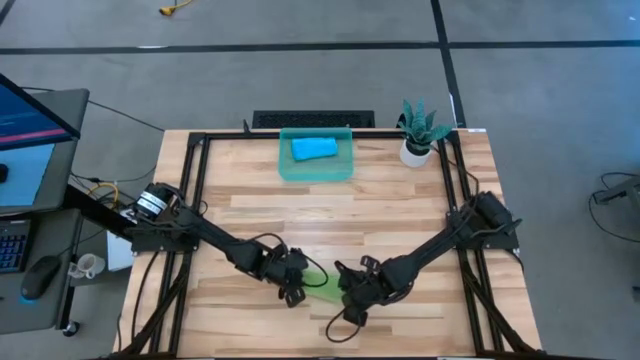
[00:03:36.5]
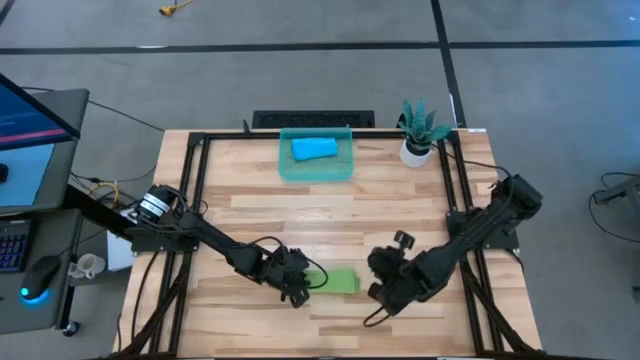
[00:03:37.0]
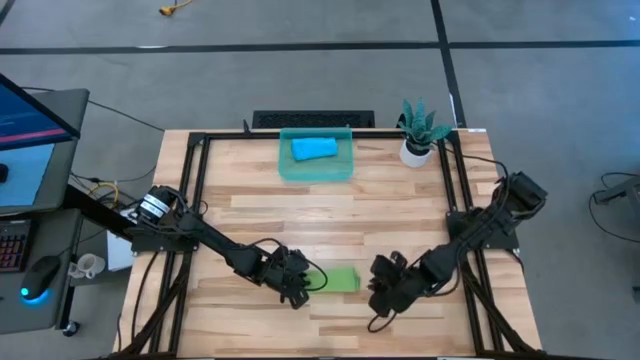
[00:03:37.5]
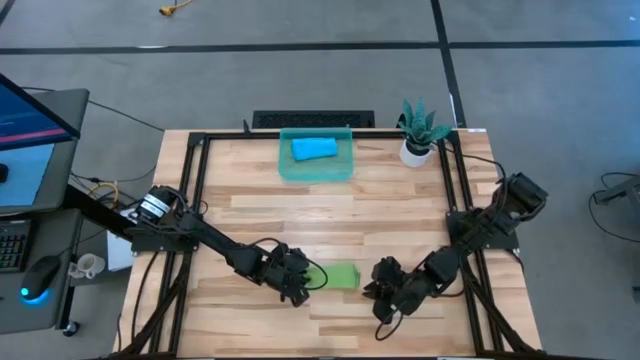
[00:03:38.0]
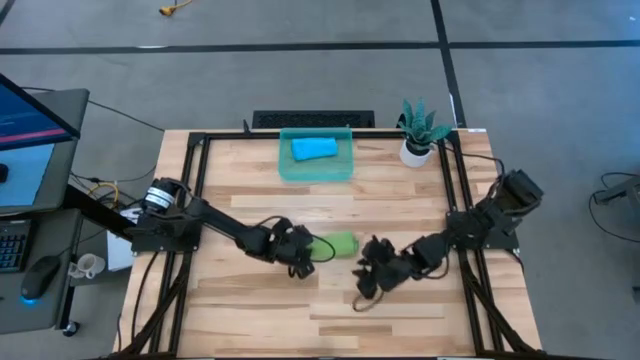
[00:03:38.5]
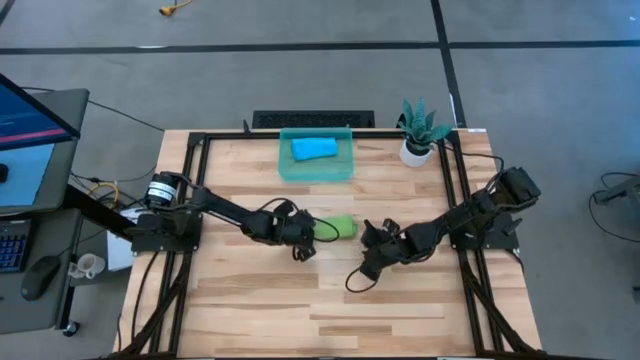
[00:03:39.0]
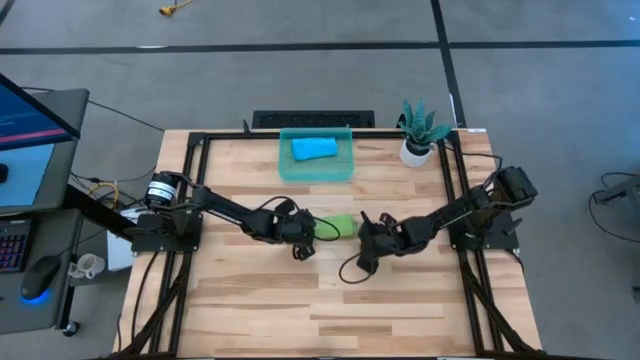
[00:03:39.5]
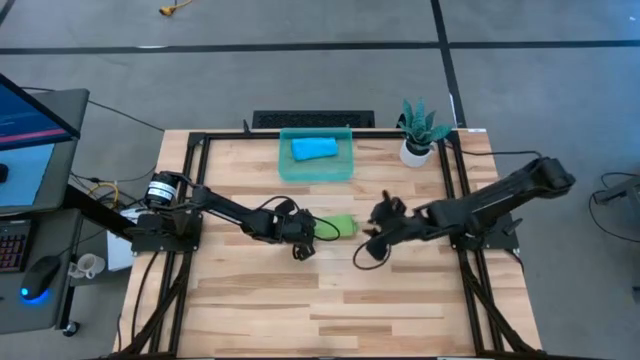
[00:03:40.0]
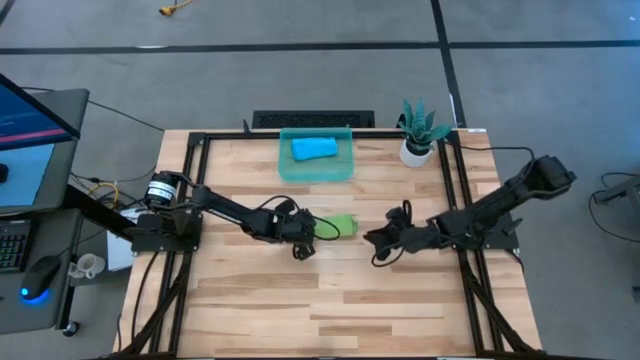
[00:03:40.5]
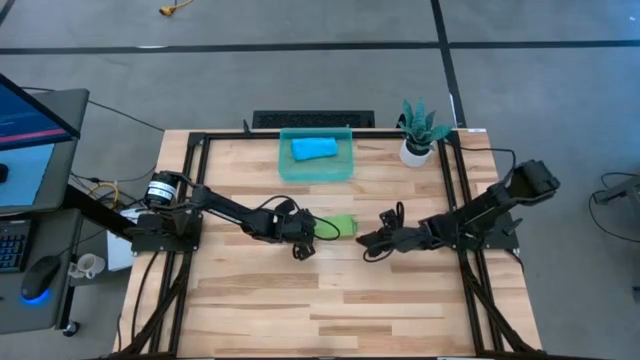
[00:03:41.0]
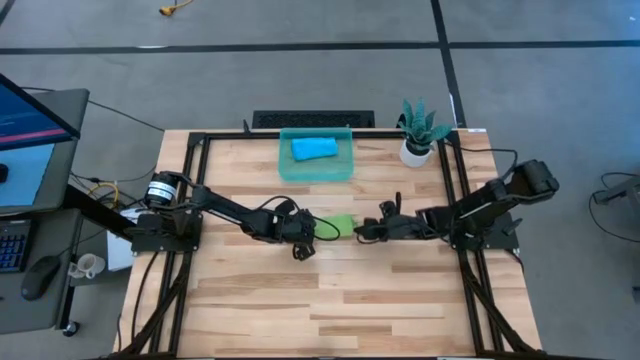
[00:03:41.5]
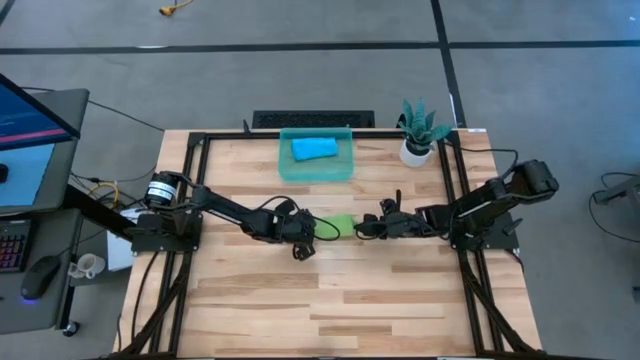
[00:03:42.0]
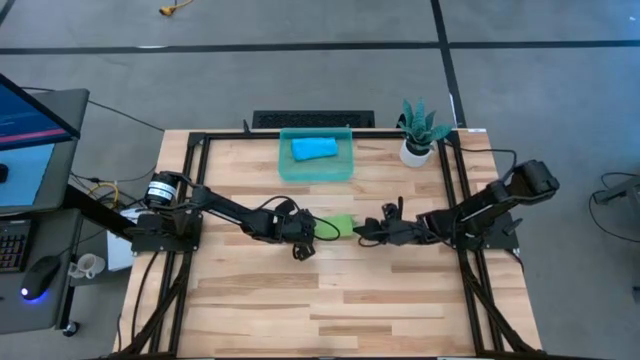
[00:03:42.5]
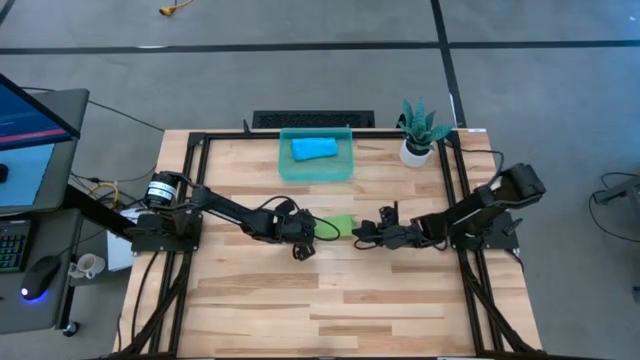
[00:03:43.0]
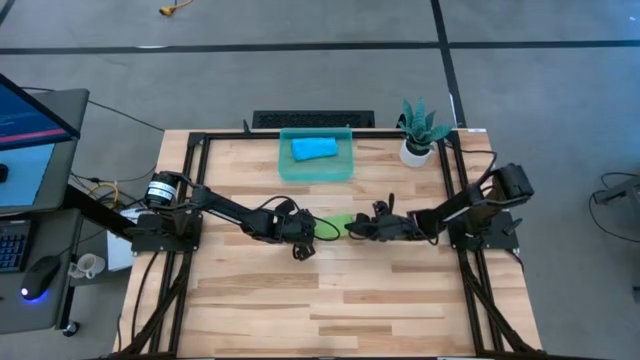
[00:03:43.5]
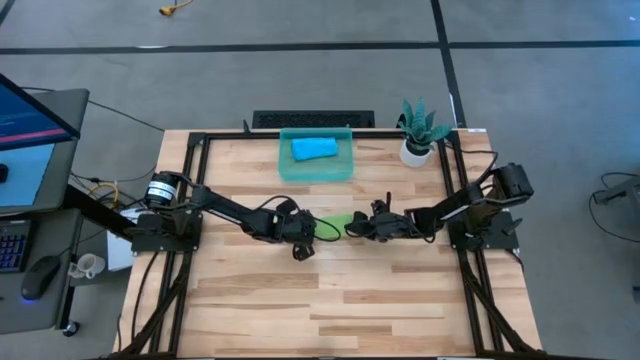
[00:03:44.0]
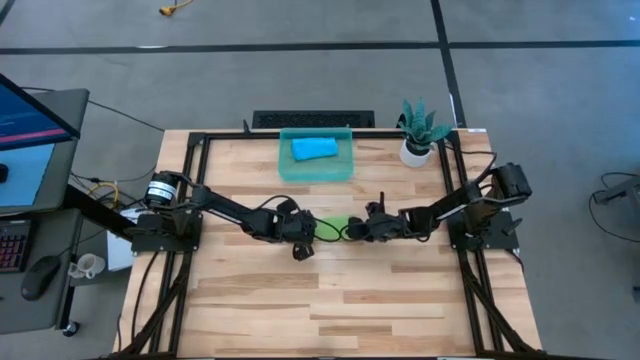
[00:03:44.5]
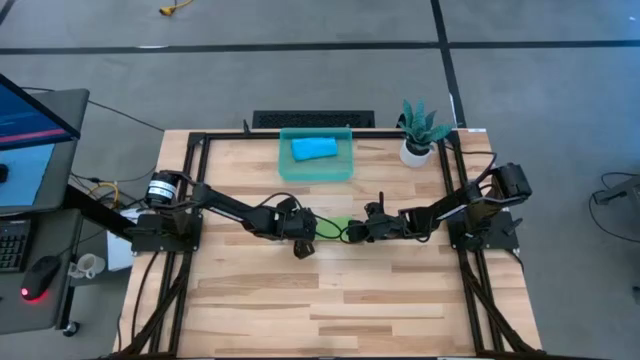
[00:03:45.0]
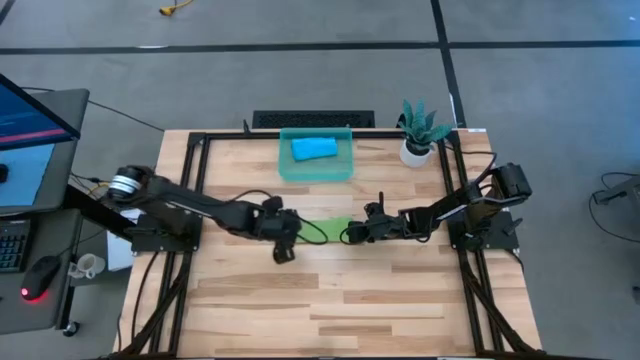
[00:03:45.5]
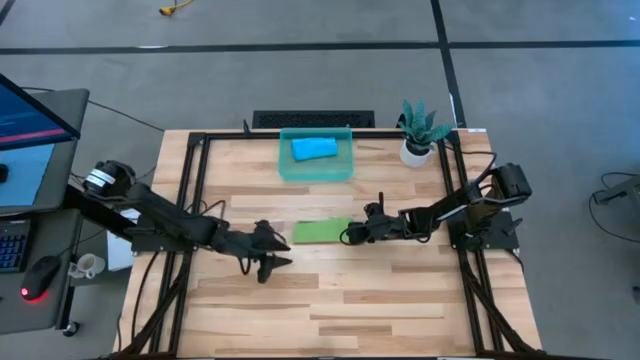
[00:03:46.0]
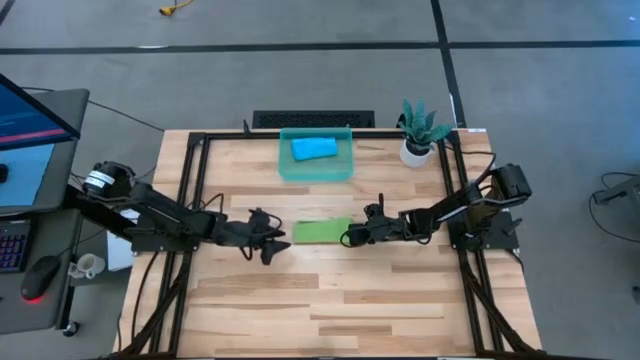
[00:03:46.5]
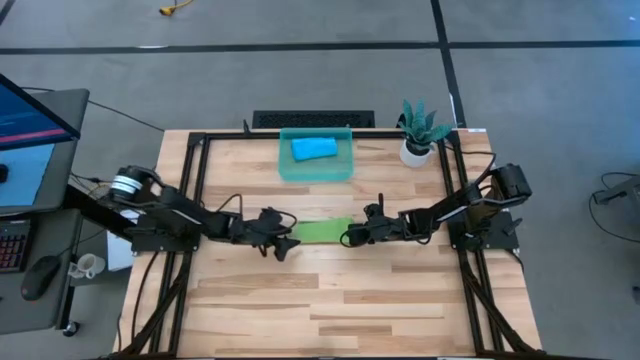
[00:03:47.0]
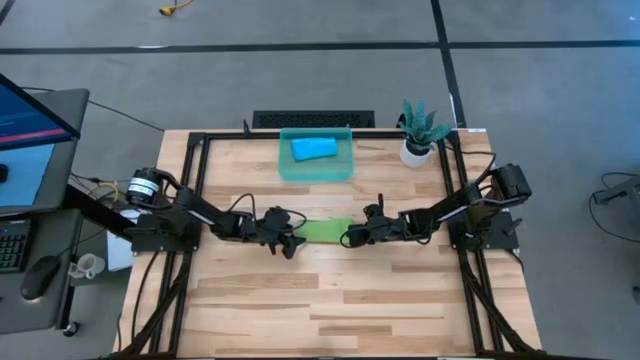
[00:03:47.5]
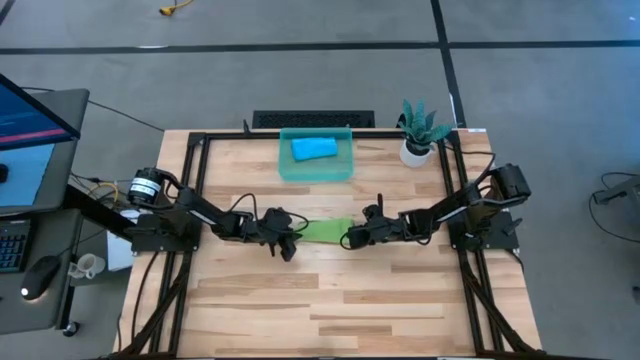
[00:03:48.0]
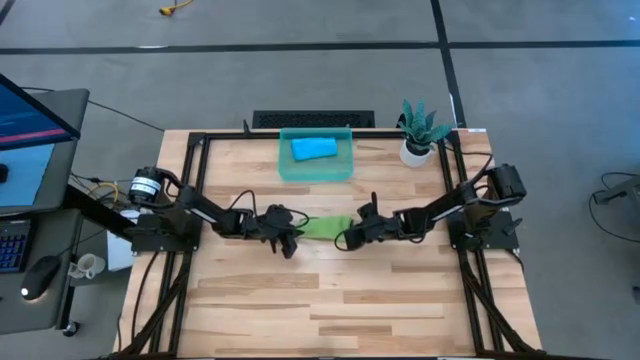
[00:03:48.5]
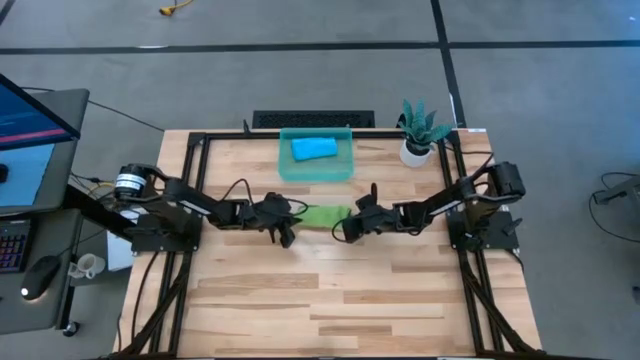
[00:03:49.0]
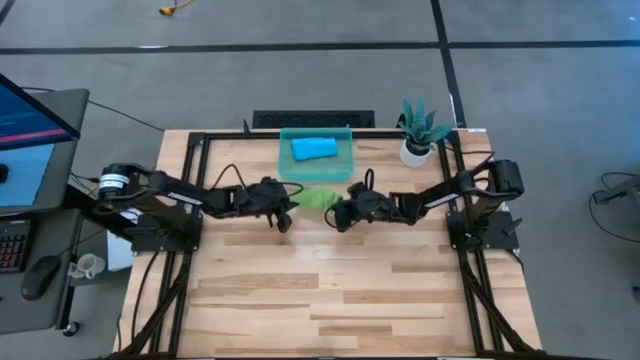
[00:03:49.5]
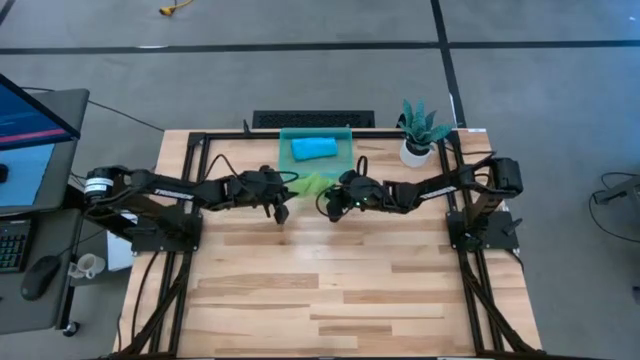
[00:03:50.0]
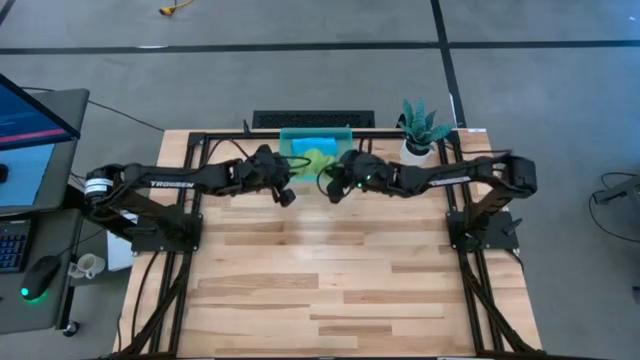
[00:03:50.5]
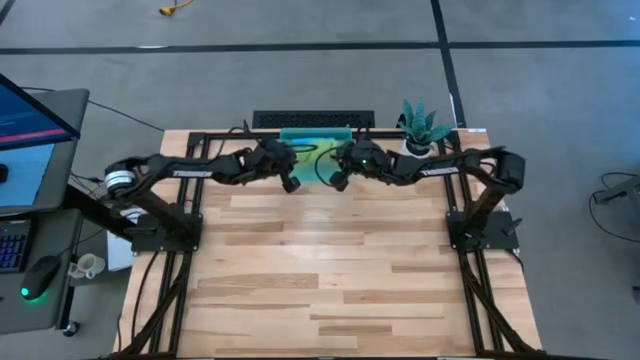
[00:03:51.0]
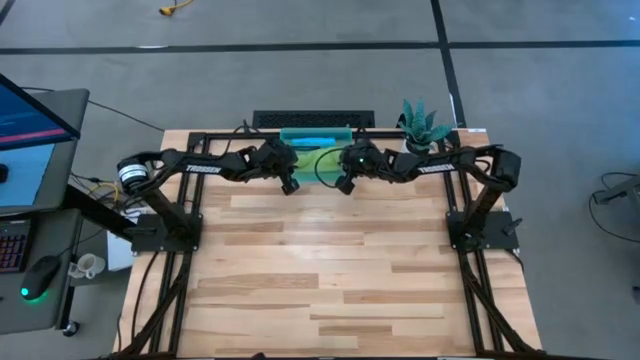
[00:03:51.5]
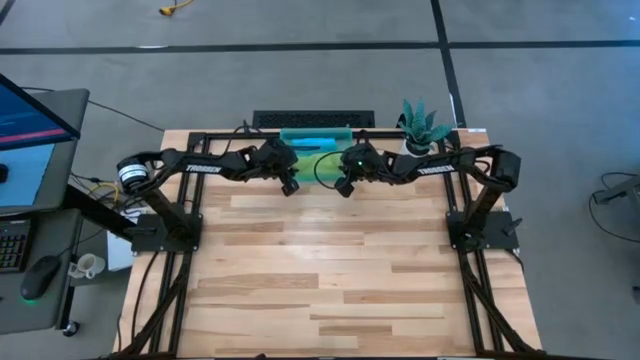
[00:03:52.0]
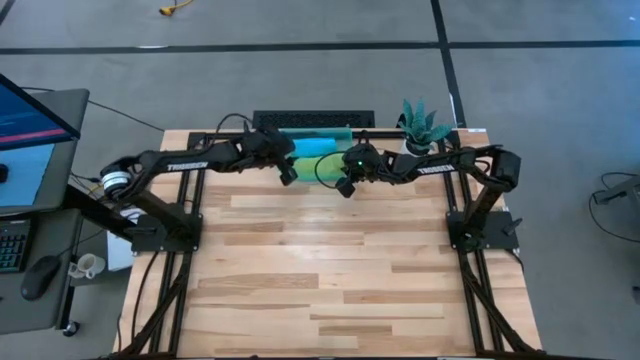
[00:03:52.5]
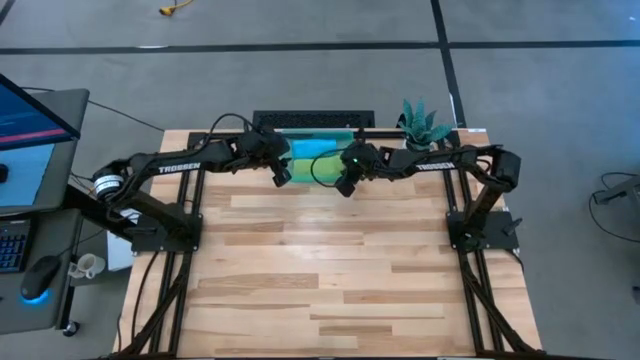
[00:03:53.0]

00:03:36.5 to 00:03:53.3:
Task: Roll microfiber towels into tight, uniform cylinder then place into a basket
Put the green microfiber cloth into the bin

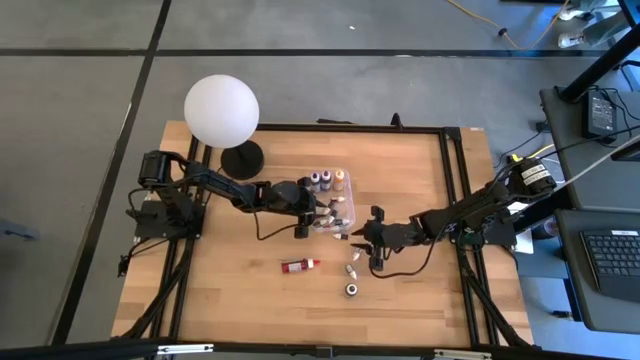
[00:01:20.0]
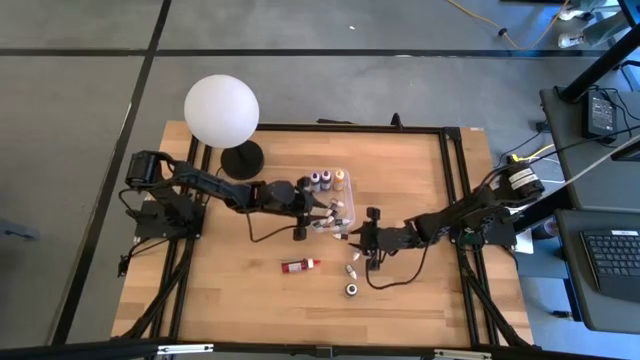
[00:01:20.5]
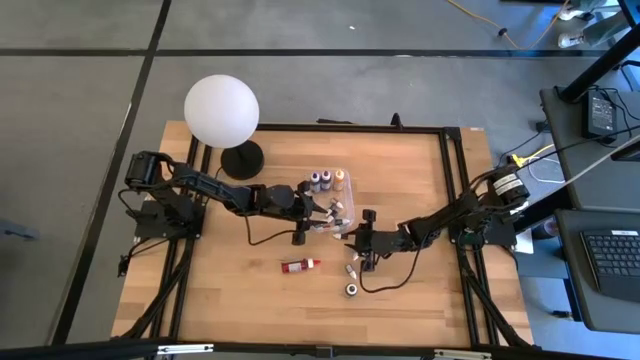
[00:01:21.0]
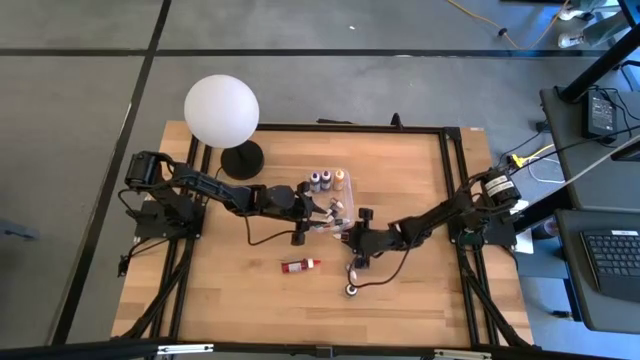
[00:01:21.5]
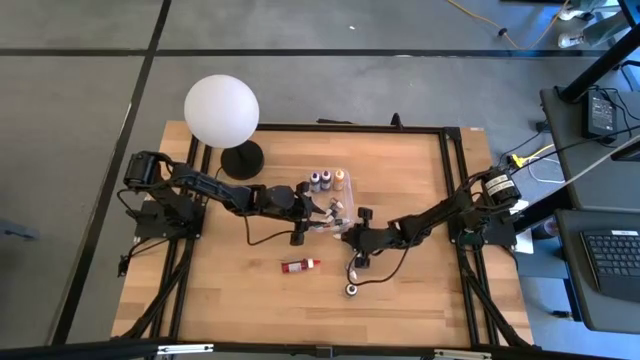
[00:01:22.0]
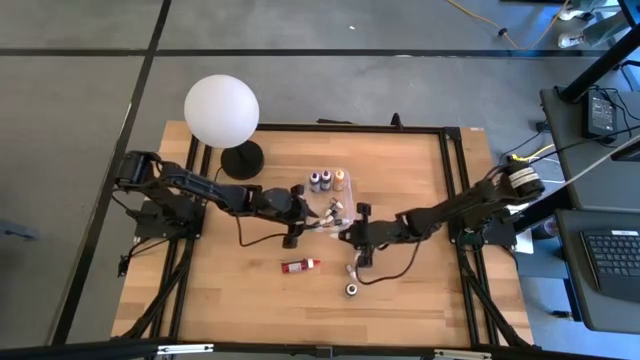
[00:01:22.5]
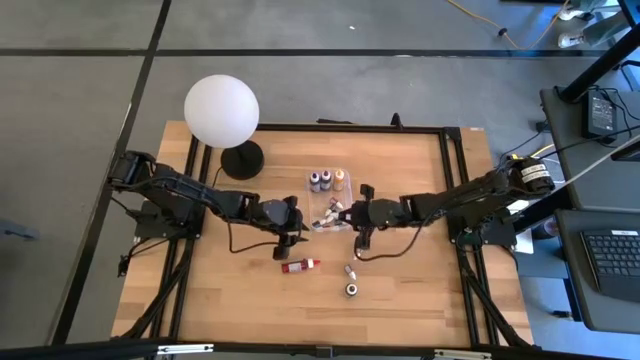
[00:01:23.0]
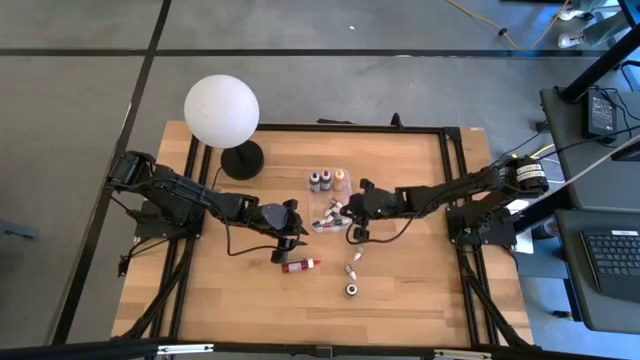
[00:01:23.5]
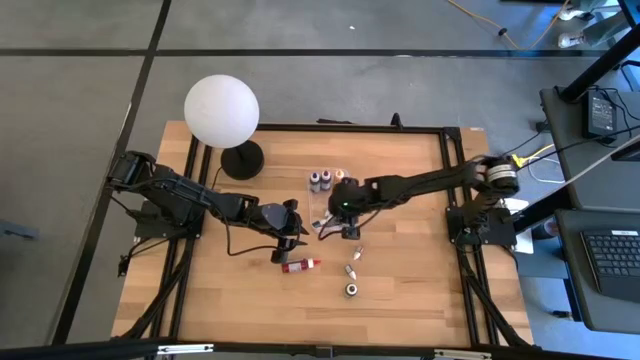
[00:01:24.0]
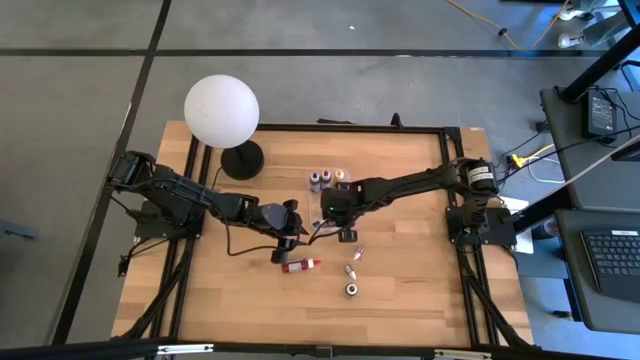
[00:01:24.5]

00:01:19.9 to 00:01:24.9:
Task: Pick & Place food coloring
Put the small black food coloring bottle in the transparent bin
